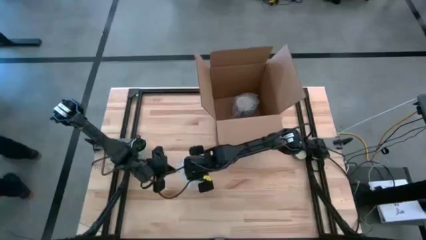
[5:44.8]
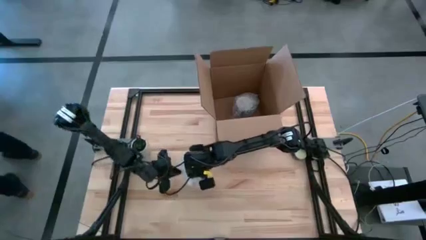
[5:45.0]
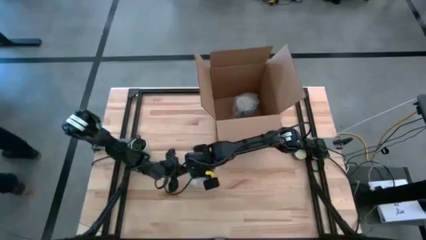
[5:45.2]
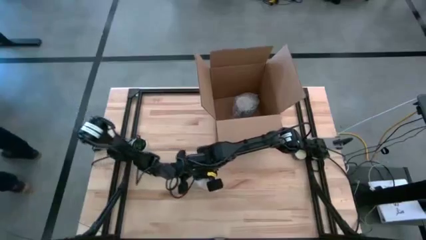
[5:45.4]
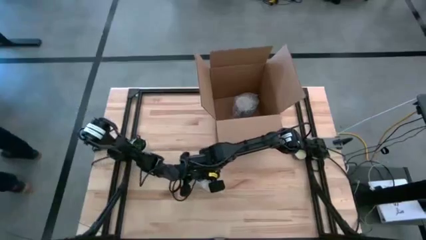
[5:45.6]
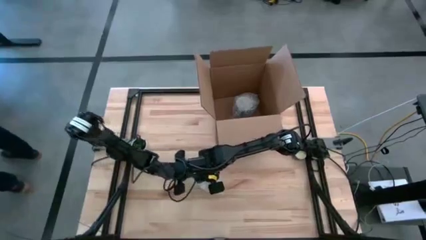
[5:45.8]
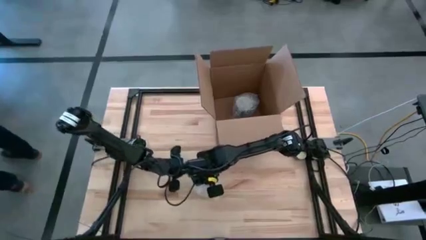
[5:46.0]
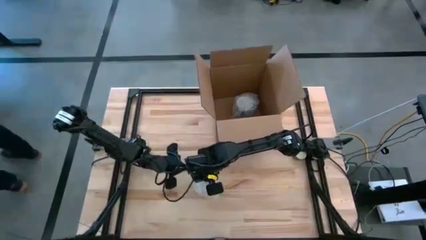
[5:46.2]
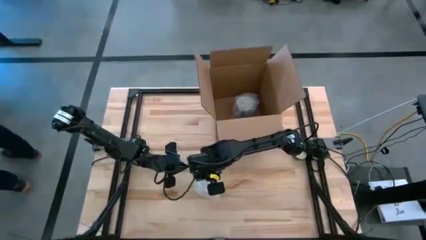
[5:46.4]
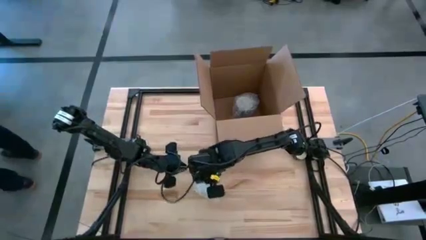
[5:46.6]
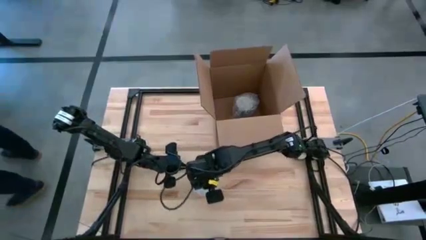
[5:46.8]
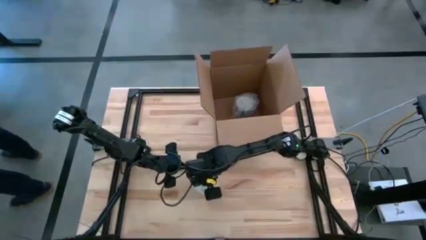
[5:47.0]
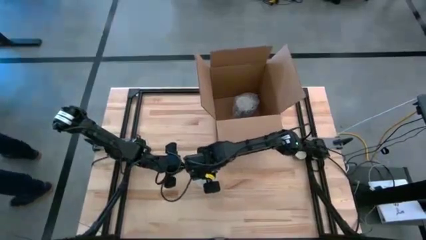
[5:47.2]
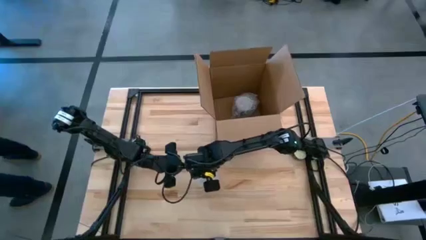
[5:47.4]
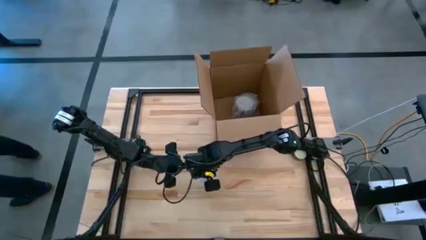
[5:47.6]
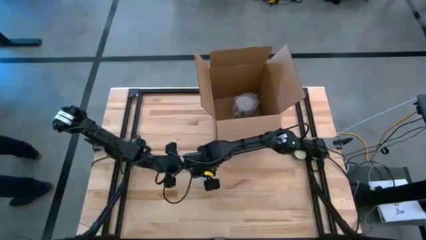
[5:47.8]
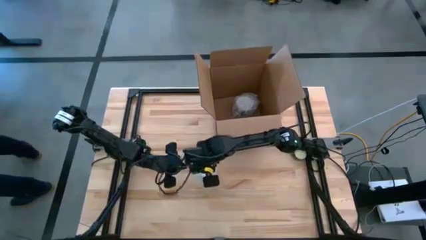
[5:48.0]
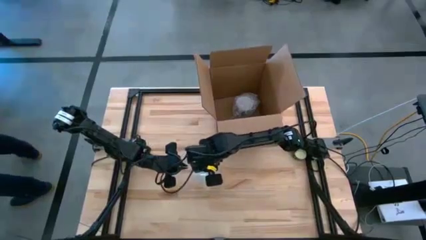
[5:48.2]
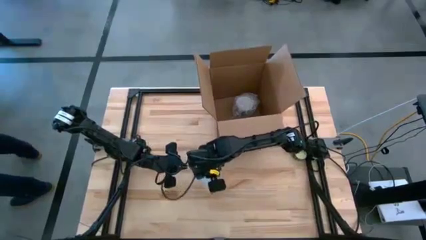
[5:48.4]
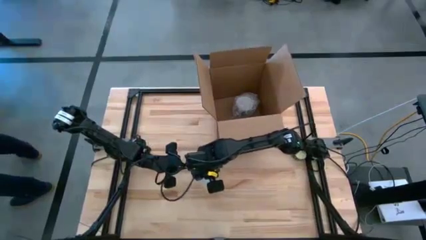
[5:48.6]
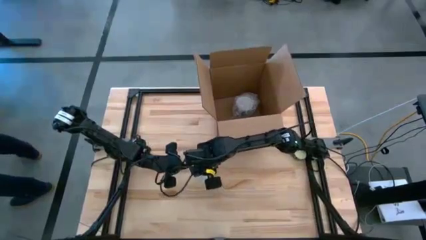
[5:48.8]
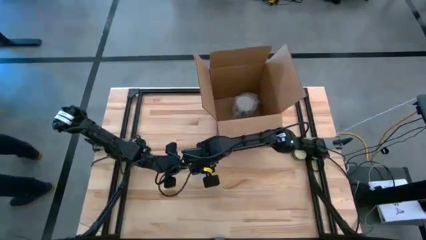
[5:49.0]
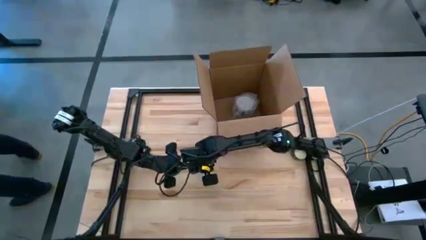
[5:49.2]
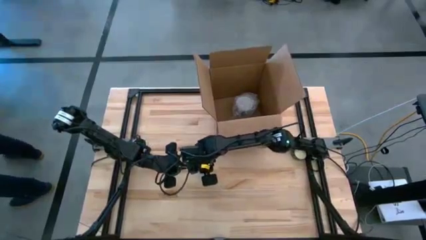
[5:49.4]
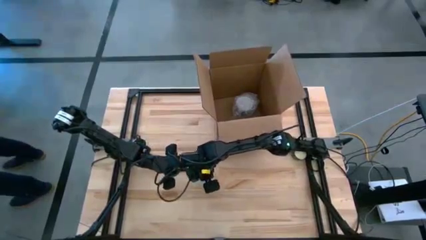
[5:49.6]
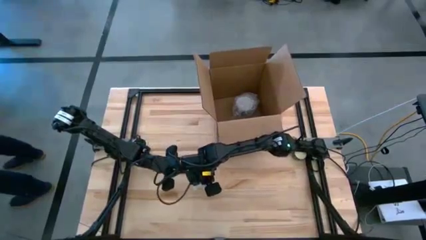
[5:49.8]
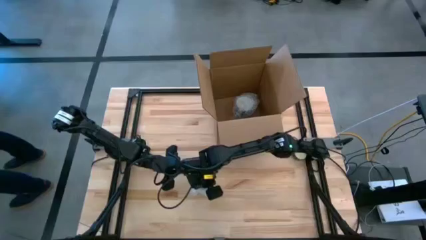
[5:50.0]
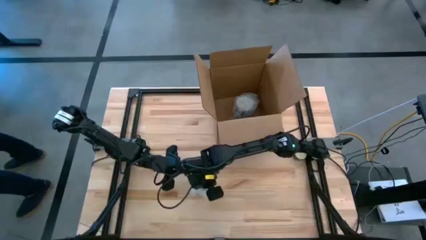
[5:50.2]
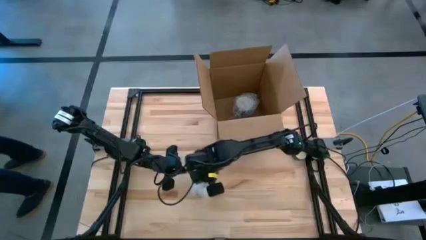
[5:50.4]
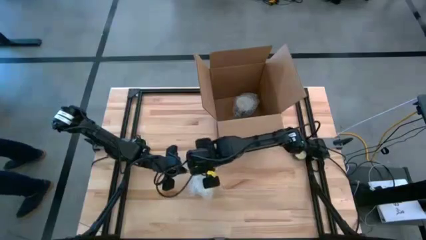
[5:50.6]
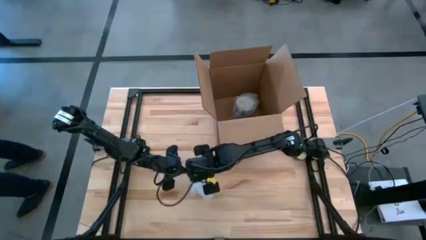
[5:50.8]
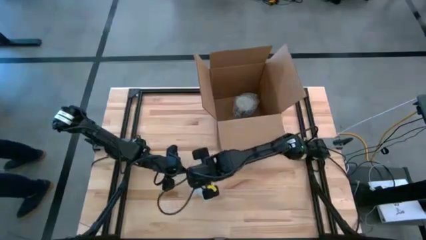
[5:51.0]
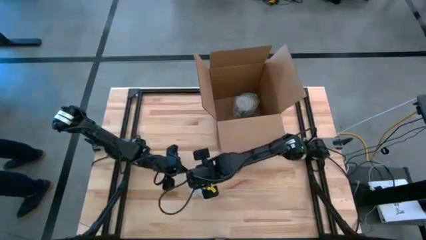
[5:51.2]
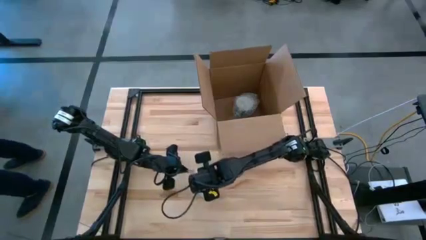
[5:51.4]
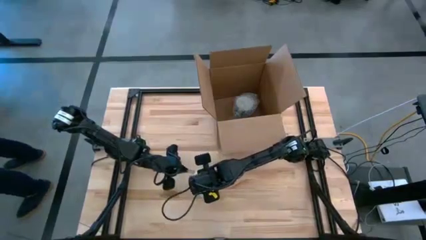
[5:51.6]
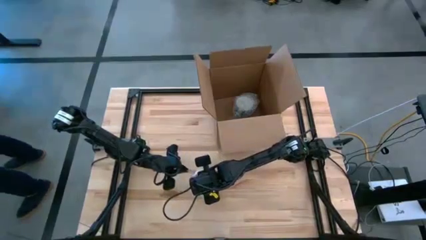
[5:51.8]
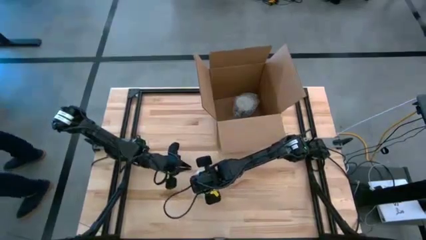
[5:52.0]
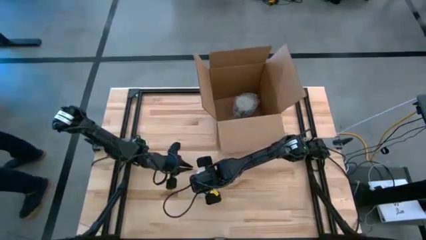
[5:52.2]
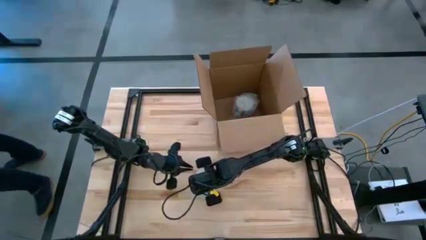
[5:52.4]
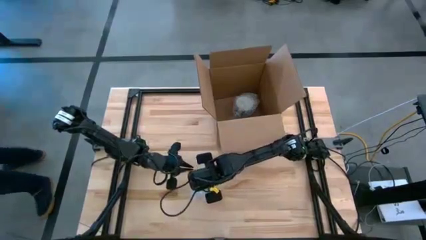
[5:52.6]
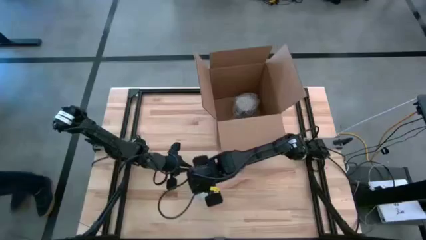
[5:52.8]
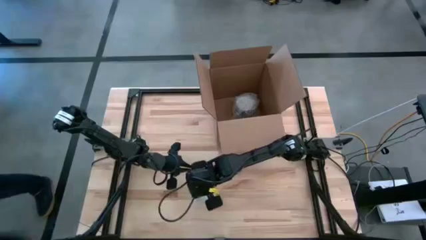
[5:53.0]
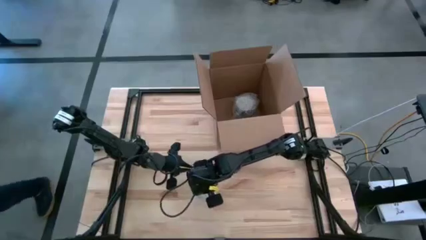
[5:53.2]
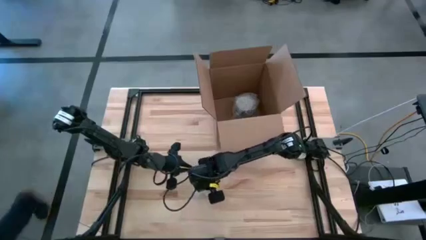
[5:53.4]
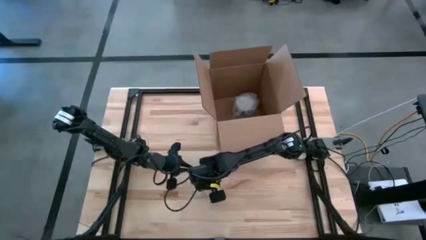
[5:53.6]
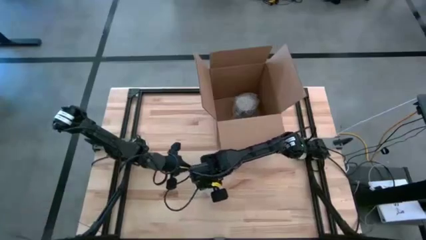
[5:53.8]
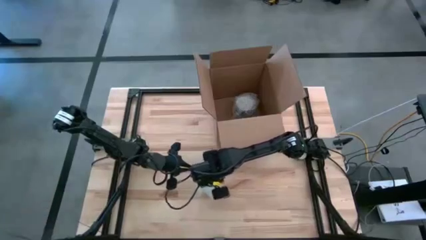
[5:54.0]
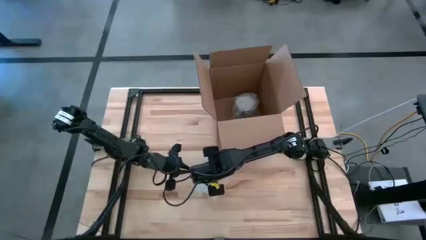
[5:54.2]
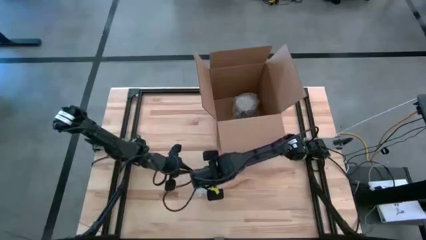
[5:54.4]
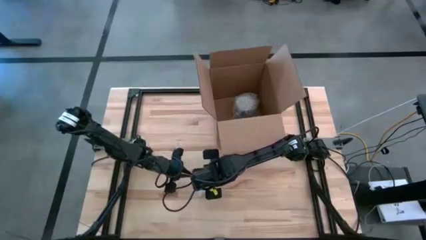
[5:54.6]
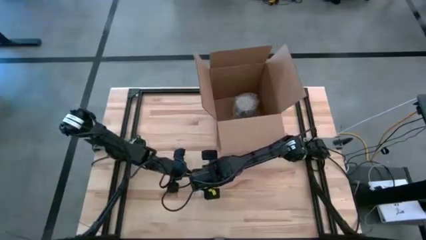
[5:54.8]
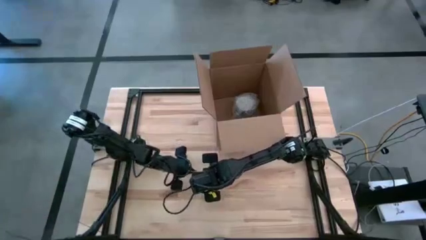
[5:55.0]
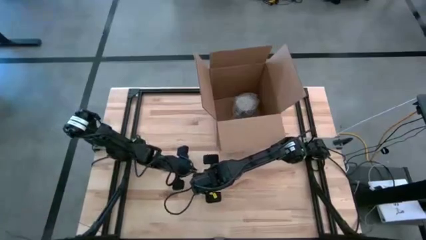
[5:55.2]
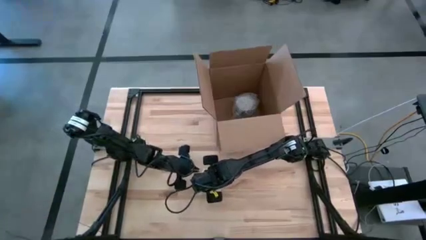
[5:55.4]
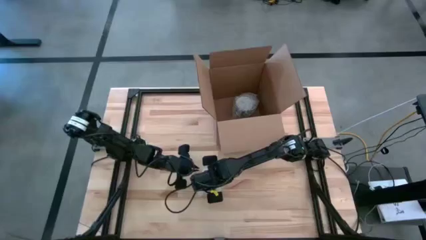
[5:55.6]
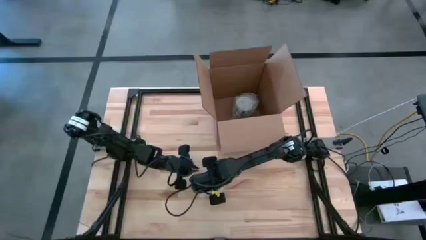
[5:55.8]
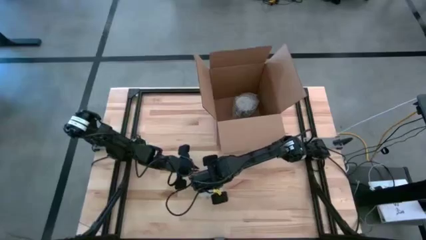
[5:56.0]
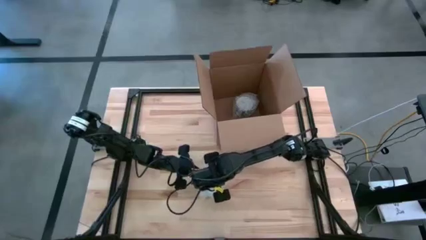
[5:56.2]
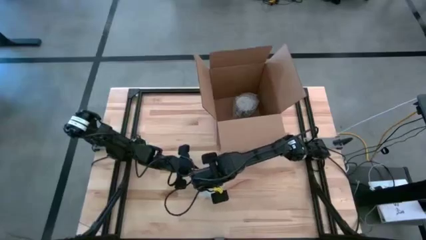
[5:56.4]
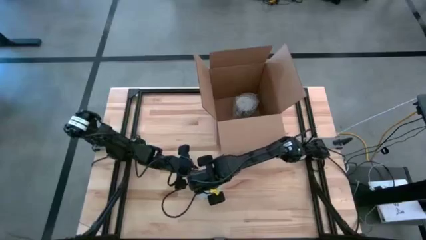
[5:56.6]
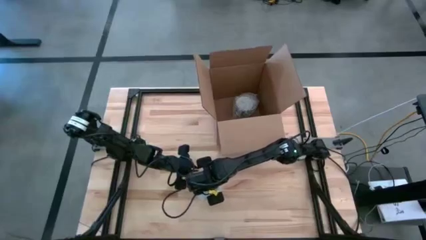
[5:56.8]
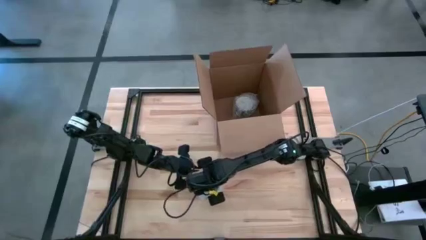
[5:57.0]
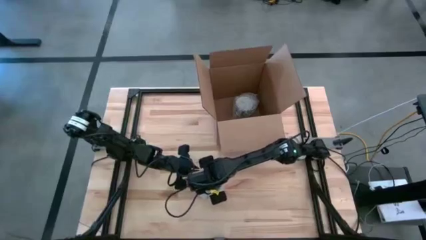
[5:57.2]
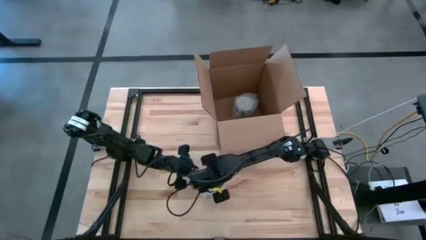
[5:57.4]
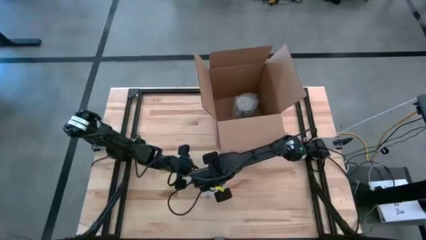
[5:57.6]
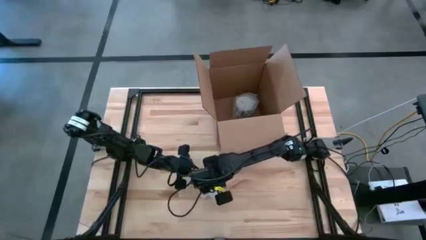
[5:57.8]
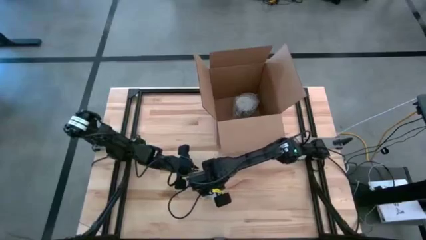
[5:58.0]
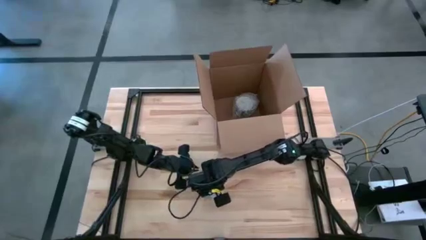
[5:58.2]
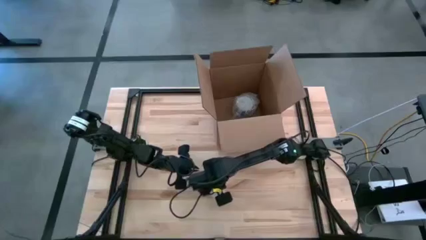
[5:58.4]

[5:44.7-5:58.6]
Task: wrap mug
Wrap the blue patterned mug with the bubble wrap

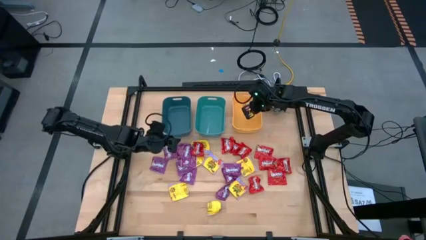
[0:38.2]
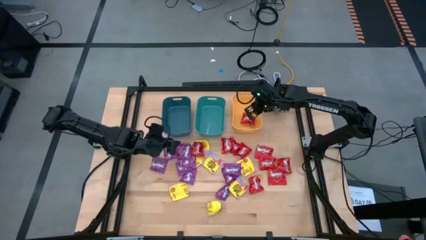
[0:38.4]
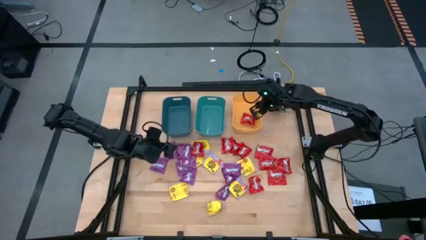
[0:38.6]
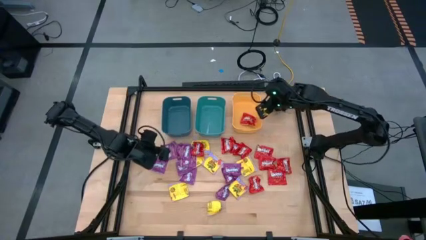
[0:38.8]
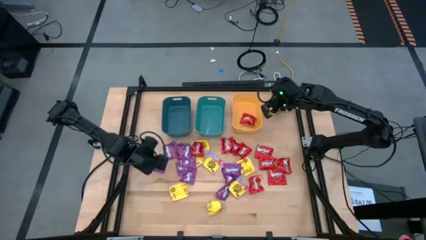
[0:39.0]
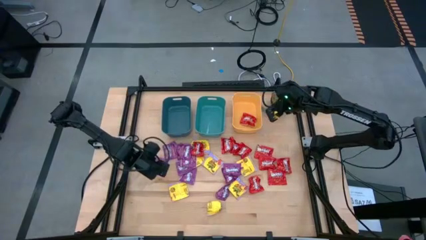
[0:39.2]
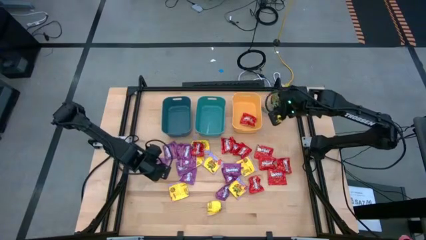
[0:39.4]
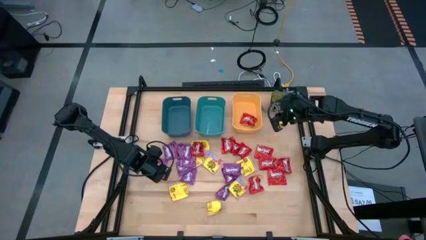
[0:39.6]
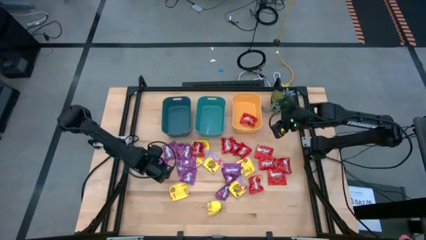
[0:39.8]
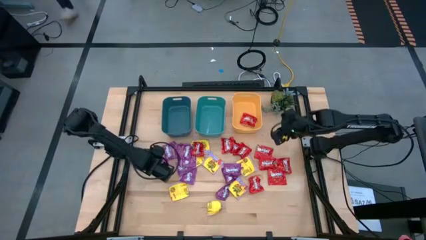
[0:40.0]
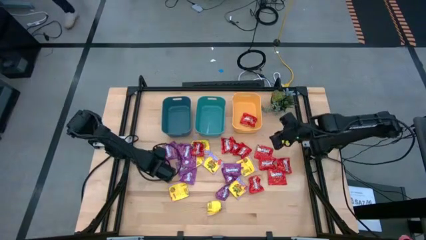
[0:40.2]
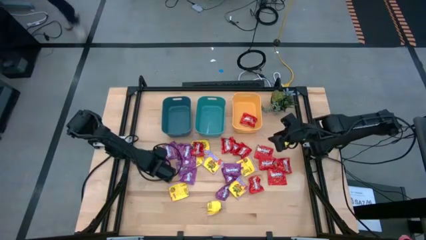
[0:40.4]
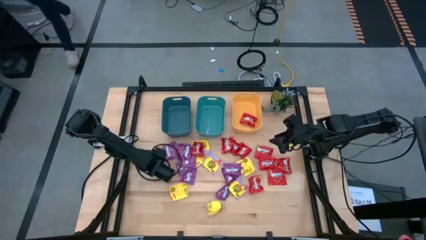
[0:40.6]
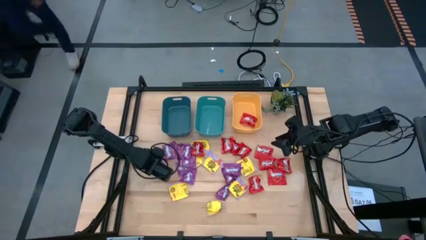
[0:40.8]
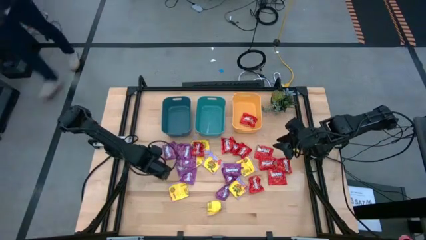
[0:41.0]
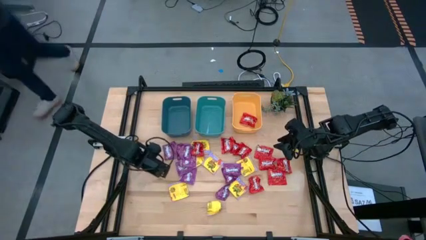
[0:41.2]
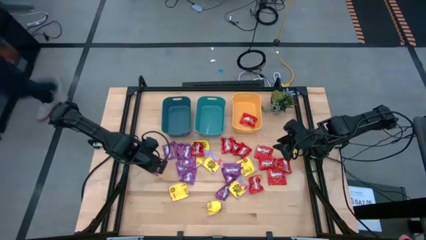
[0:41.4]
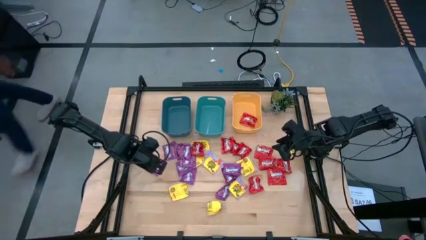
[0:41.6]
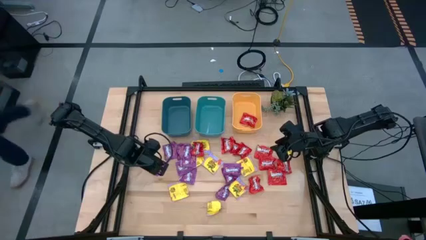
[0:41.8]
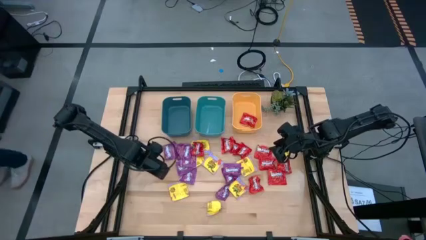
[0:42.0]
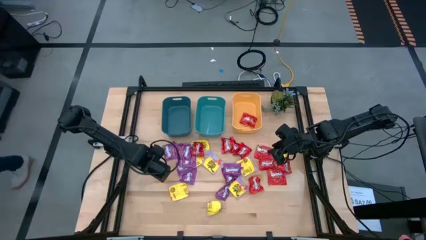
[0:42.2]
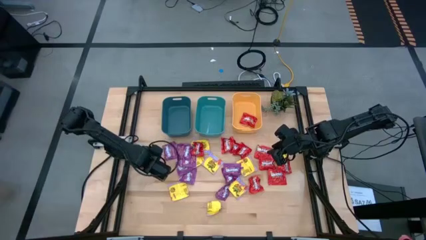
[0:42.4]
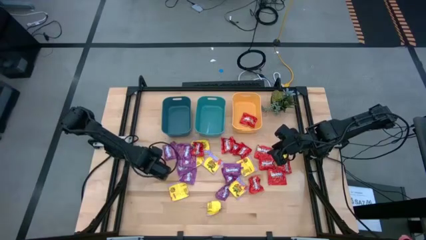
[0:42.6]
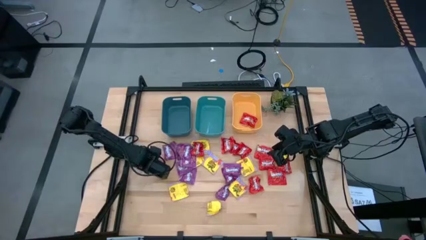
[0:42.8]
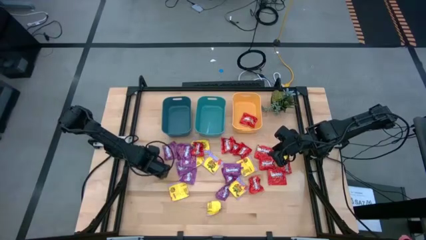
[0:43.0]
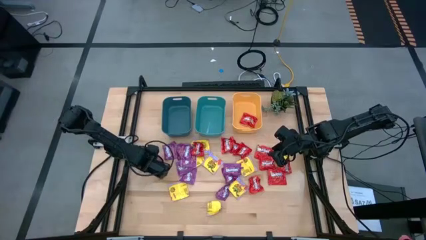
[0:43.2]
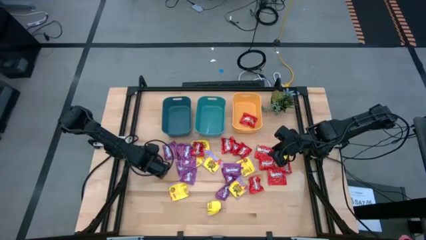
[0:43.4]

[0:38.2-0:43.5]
Task: Sort candy
Put the violet candy into the blue bin
